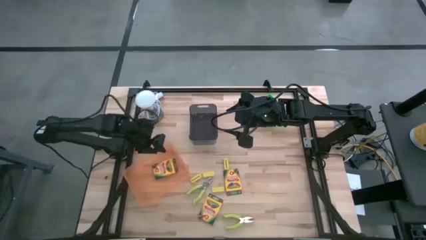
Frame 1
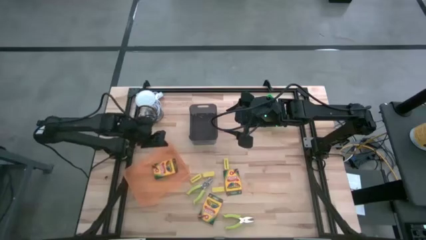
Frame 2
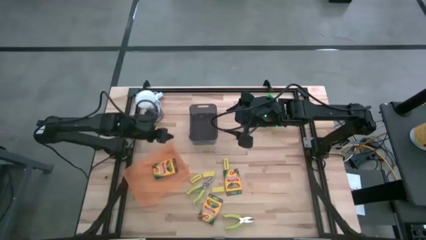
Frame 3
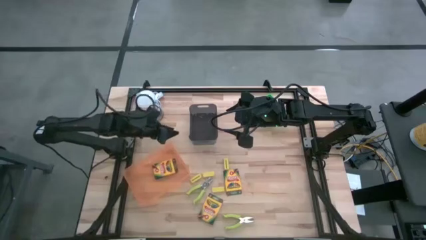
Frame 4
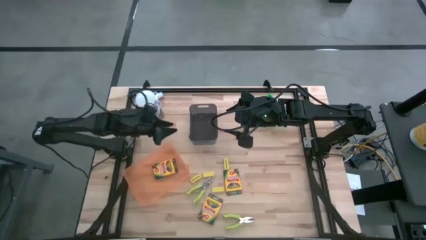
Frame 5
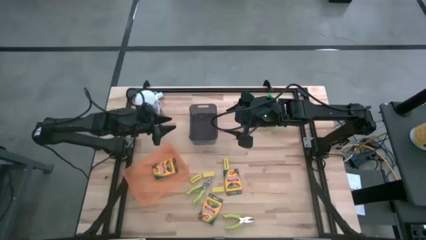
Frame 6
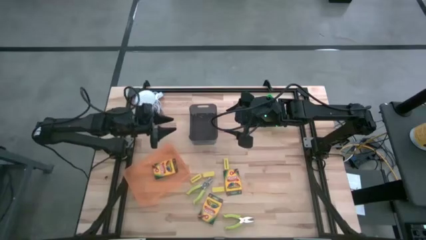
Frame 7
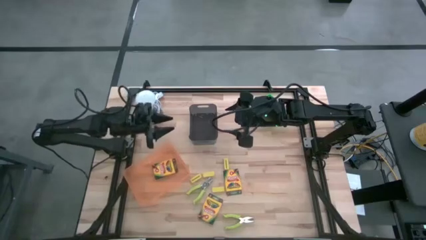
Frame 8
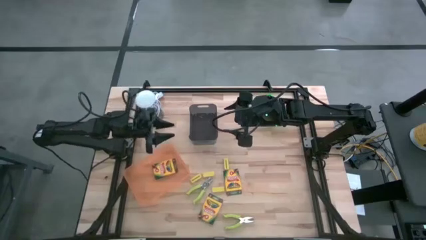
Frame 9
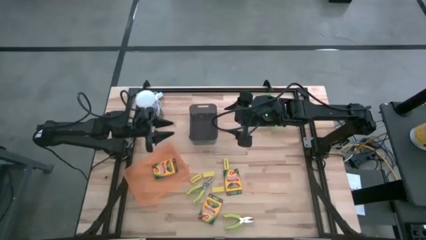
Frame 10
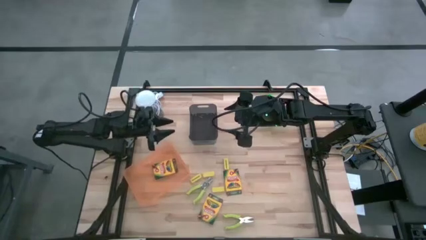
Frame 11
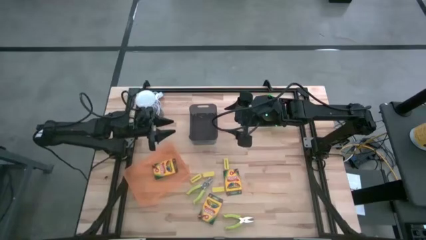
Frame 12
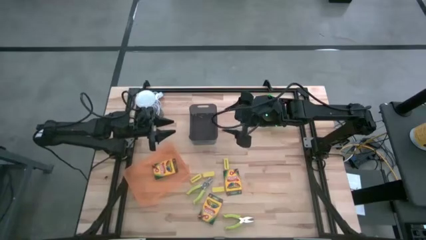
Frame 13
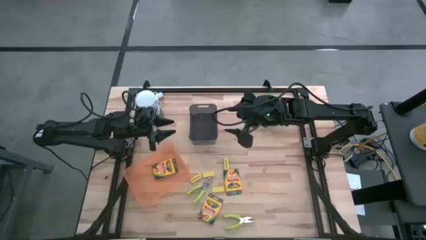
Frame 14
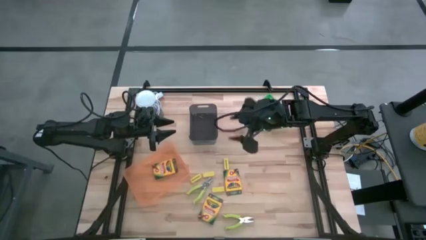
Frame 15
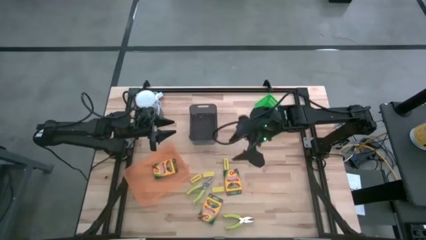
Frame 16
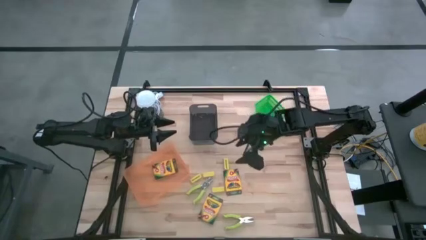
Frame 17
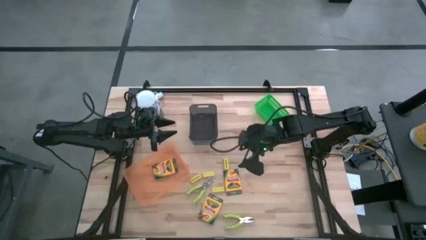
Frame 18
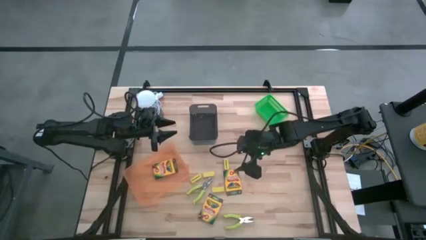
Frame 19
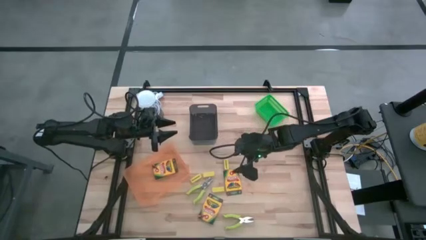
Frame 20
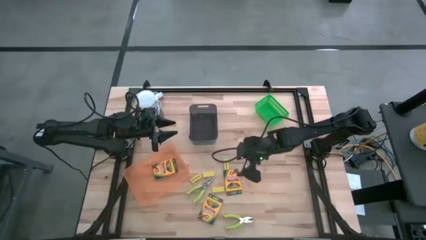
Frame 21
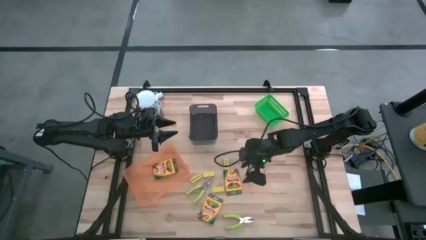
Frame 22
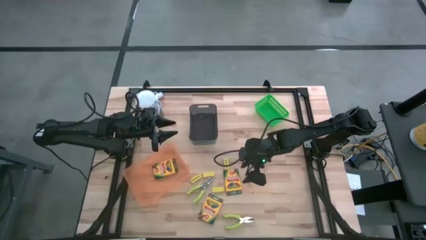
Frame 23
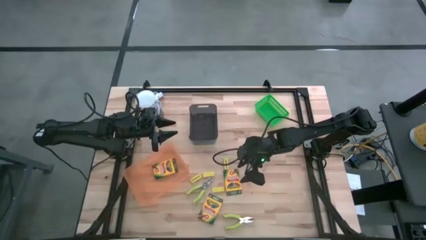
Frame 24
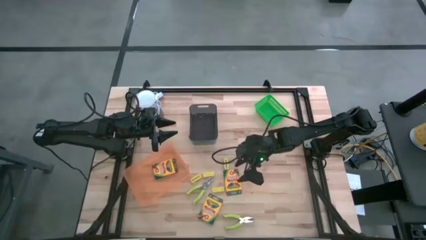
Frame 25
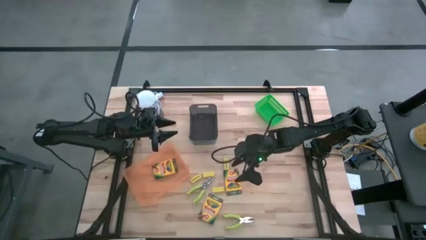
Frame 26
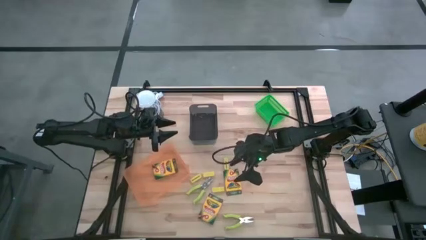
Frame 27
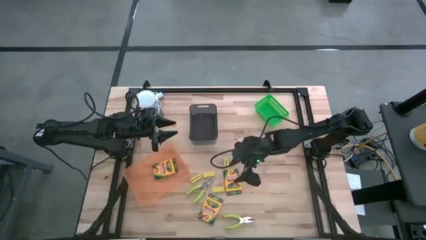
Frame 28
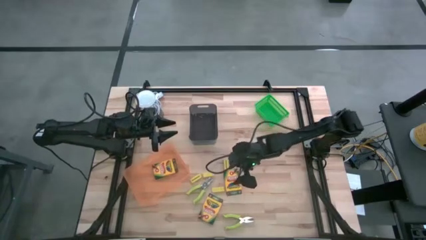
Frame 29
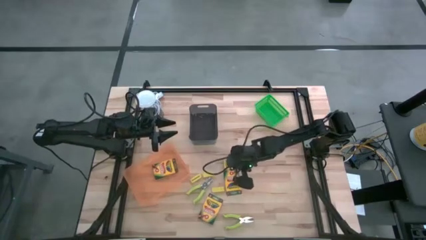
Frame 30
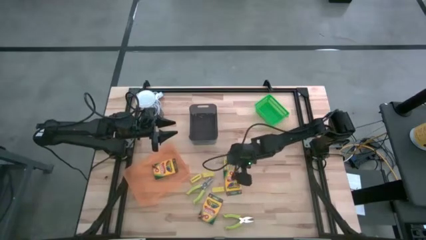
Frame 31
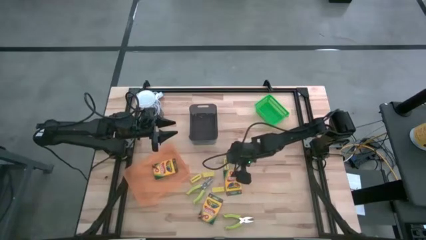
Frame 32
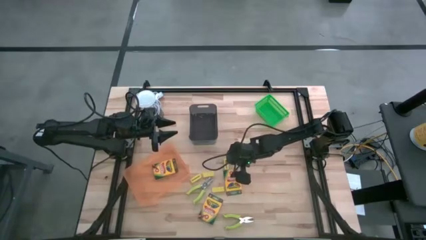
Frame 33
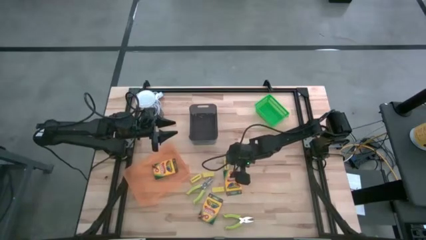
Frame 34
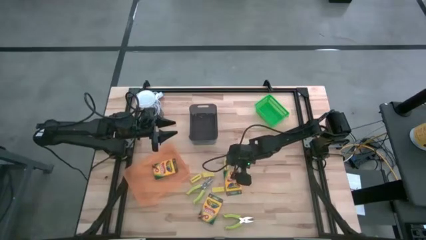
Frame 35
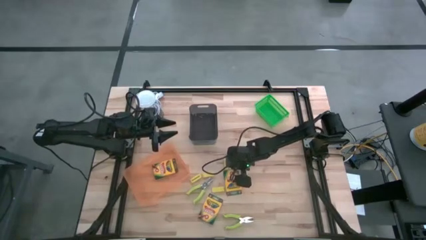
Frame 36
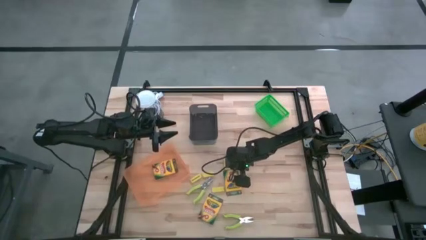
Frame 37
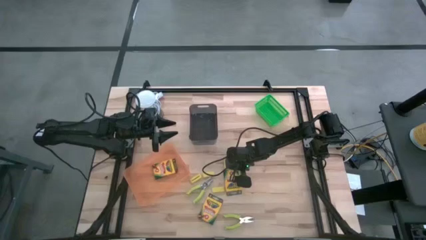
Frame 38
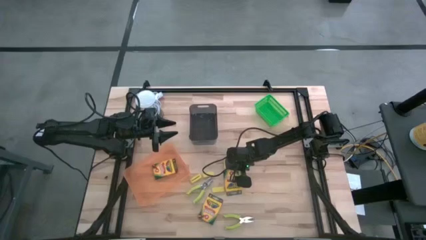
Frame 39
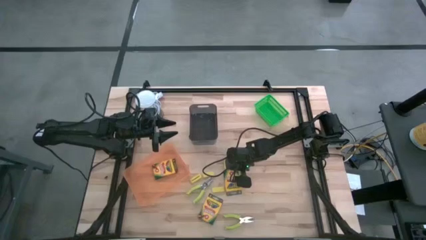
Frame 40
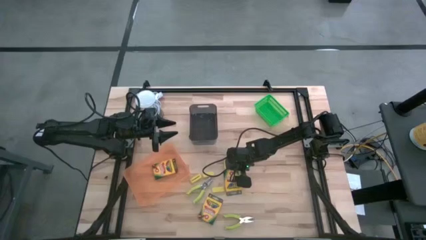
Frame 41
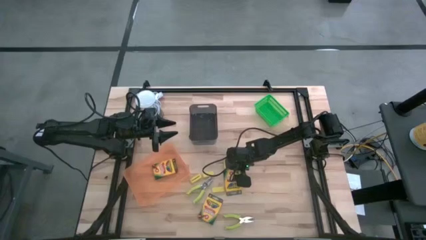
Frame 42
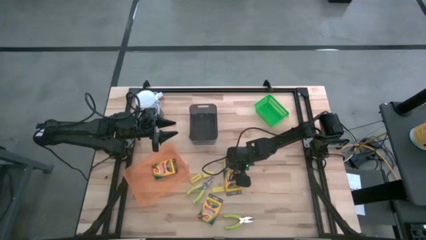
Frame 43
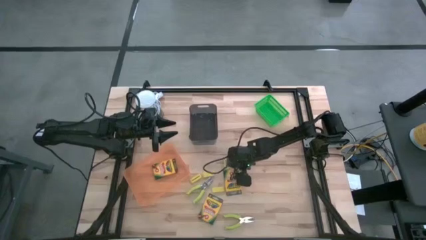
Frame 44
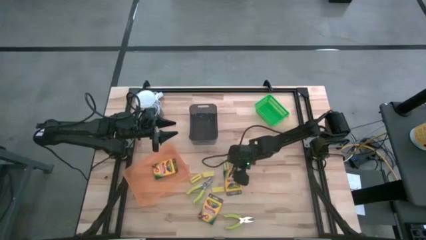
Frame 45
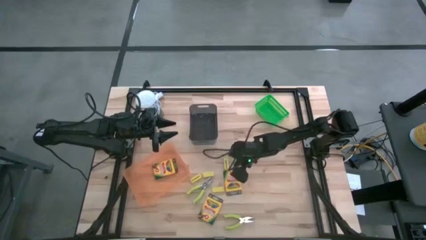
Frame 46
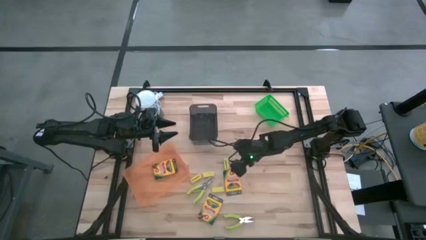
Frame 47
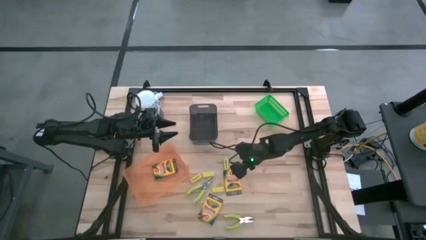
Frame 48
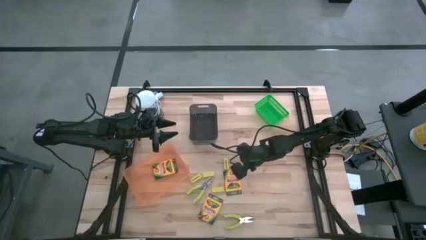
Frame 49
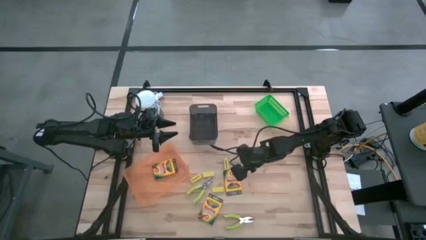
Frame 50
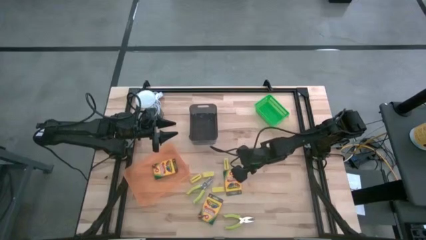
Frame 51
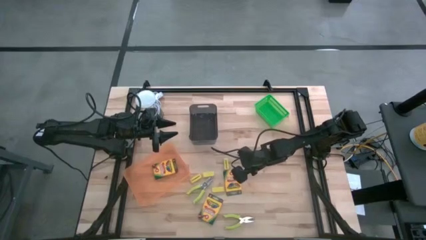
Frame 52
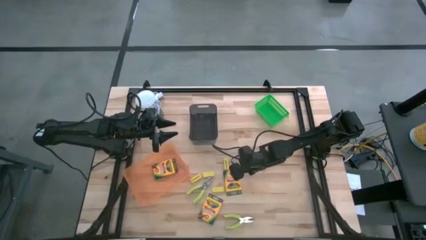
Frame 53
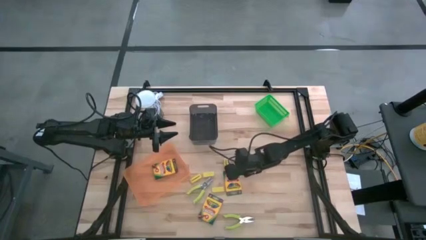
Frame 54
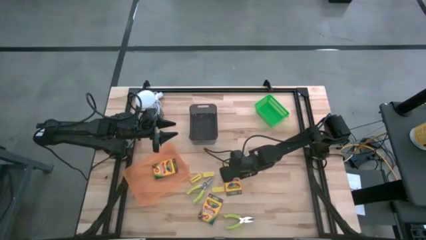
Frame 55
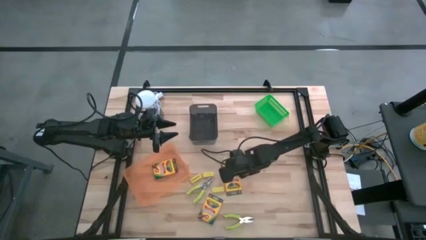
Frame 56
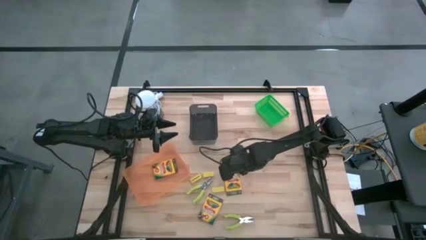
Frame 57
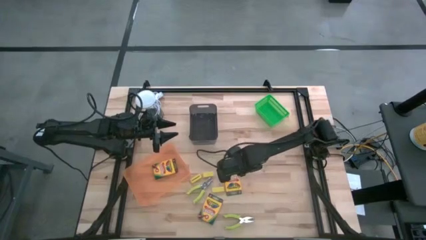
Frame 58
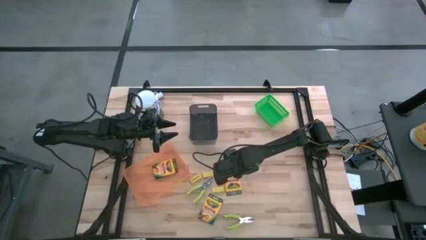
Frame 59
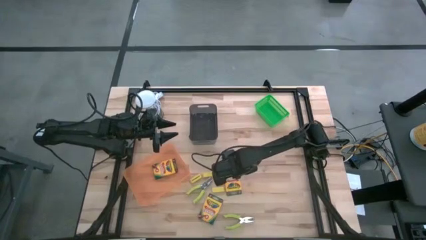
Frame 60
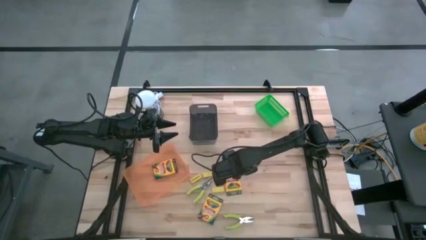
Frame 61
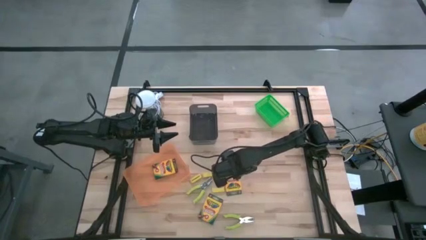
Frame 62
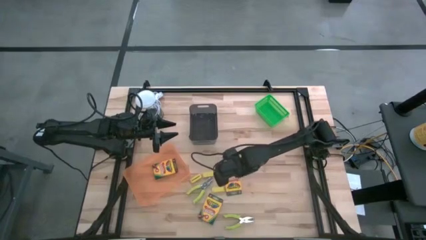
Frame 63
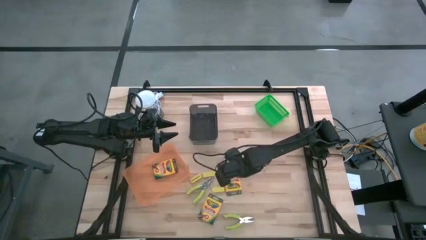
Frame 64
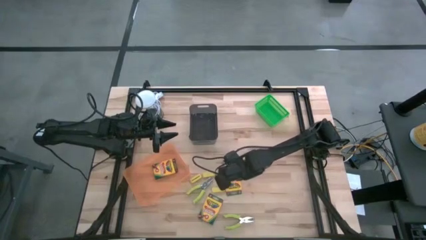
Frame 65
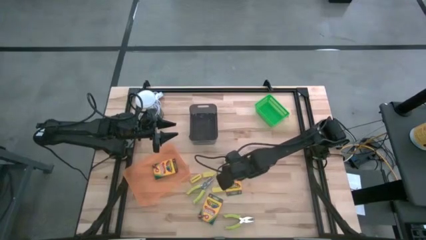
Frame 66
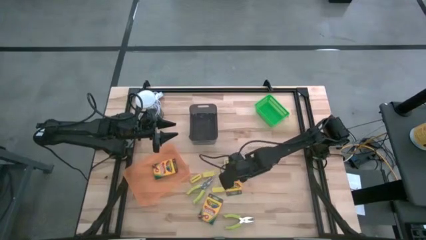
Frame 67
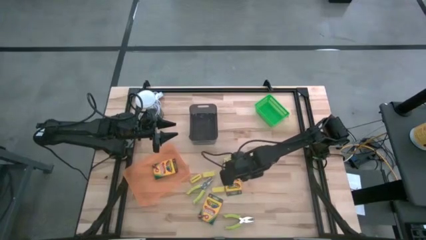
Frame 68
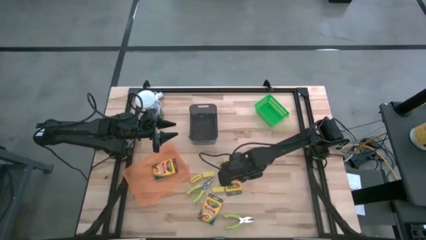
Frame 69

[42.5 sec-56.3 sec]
Task: Pick & Place School Supplies
Put the pack of crayons into the orange bin
